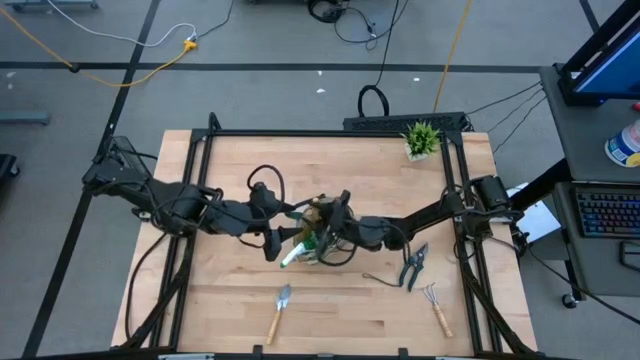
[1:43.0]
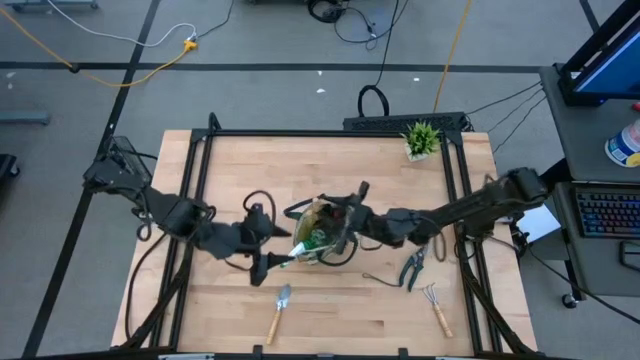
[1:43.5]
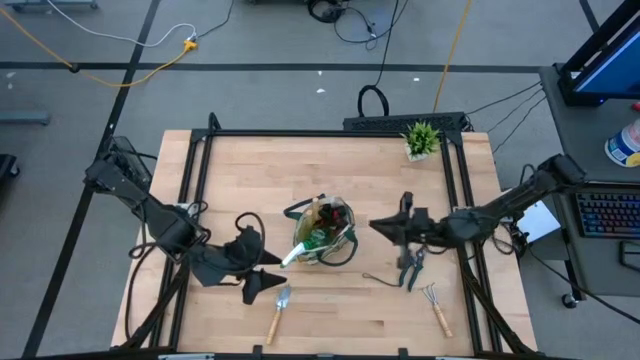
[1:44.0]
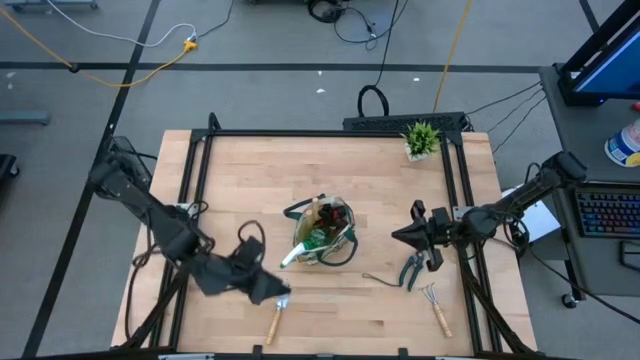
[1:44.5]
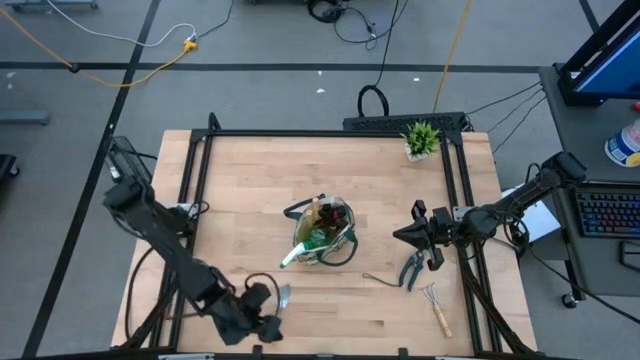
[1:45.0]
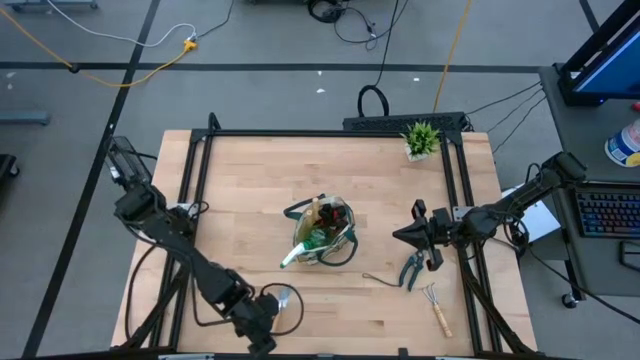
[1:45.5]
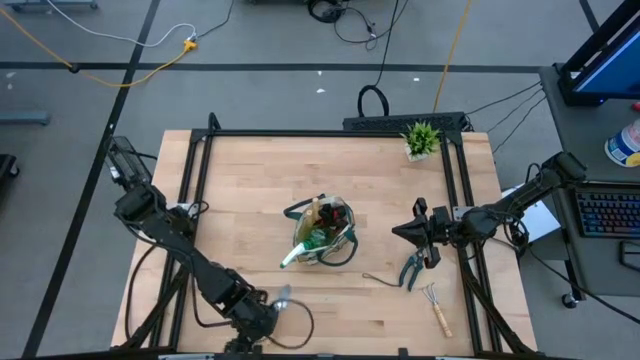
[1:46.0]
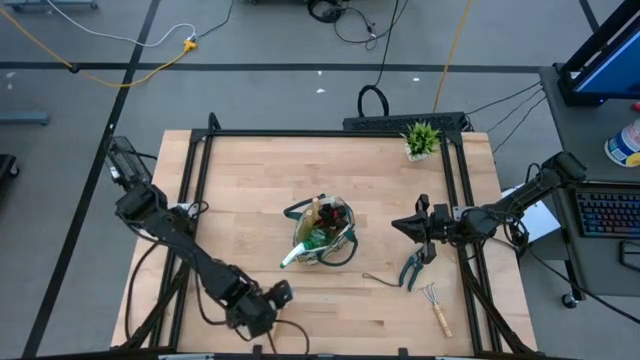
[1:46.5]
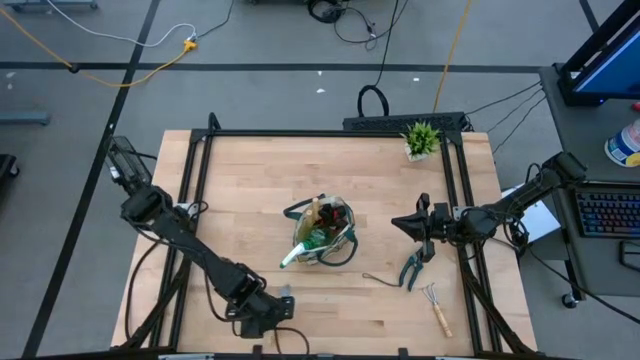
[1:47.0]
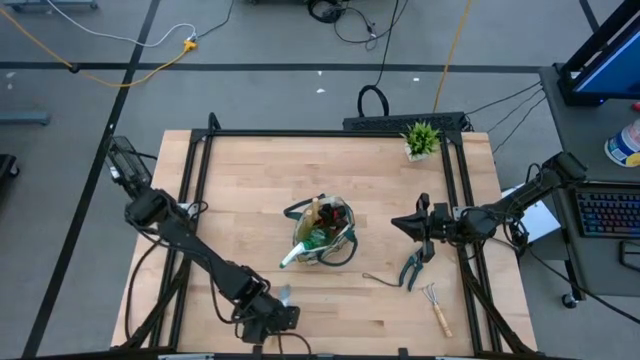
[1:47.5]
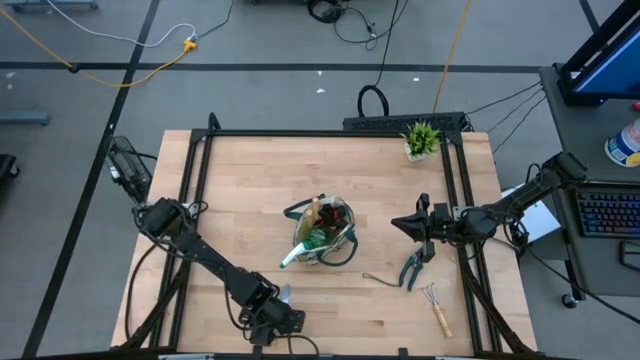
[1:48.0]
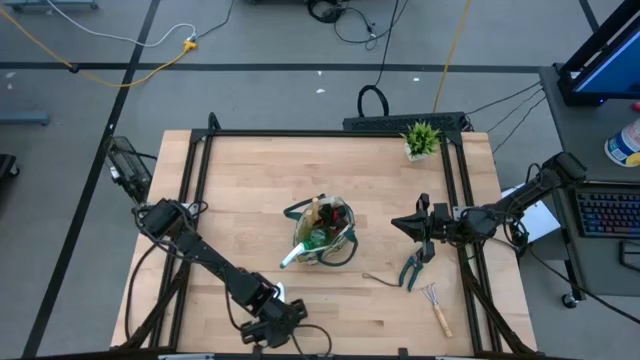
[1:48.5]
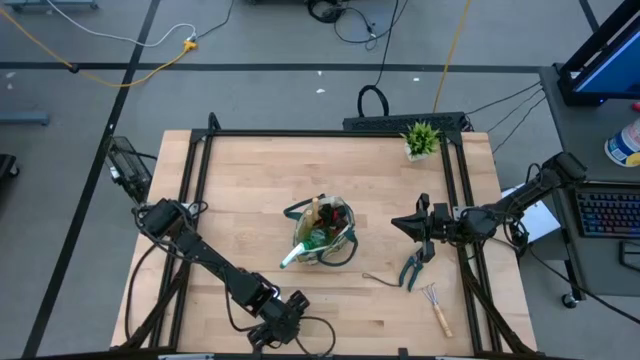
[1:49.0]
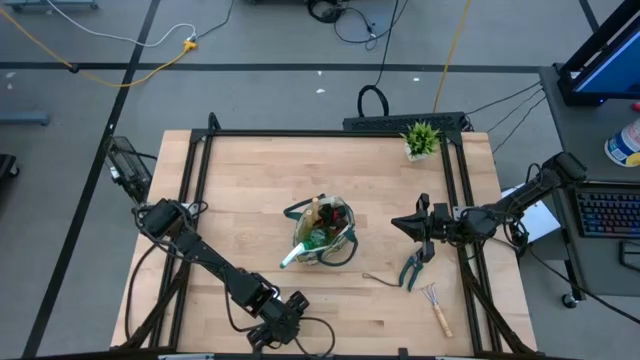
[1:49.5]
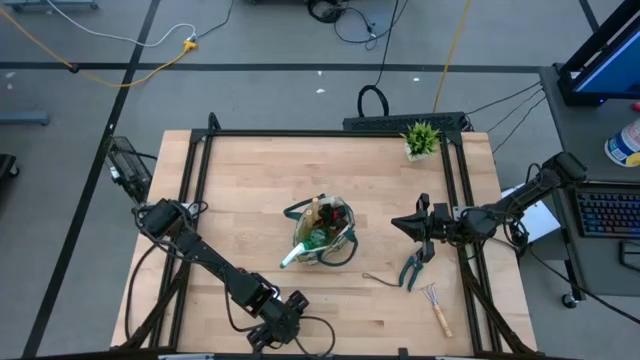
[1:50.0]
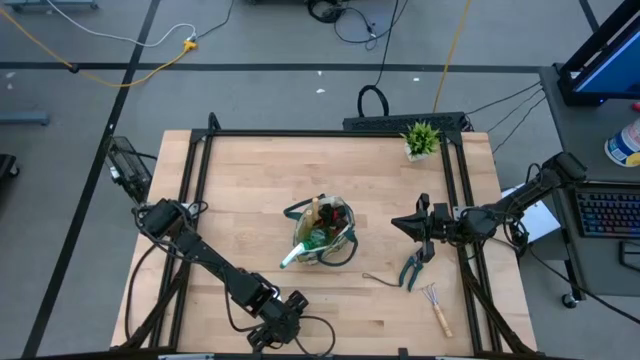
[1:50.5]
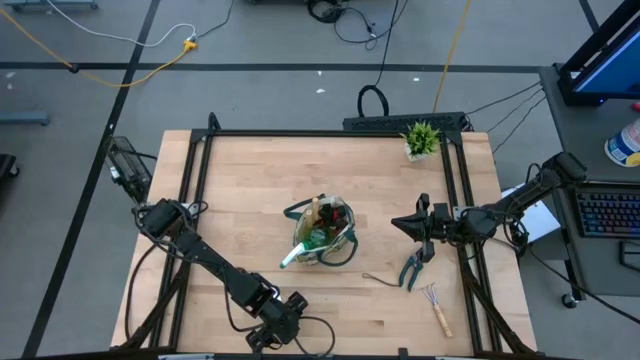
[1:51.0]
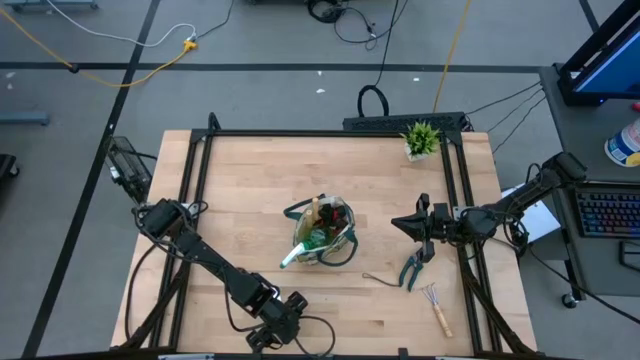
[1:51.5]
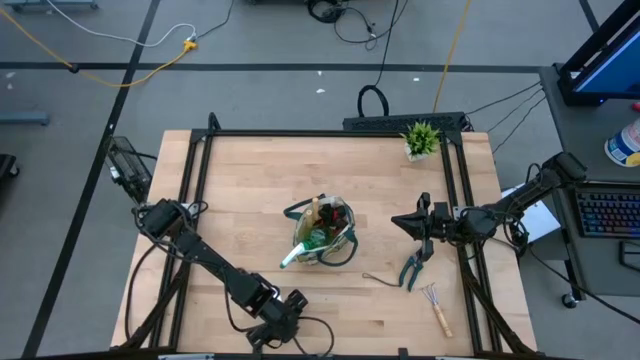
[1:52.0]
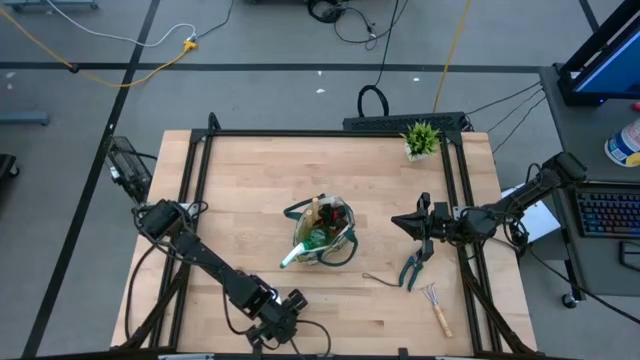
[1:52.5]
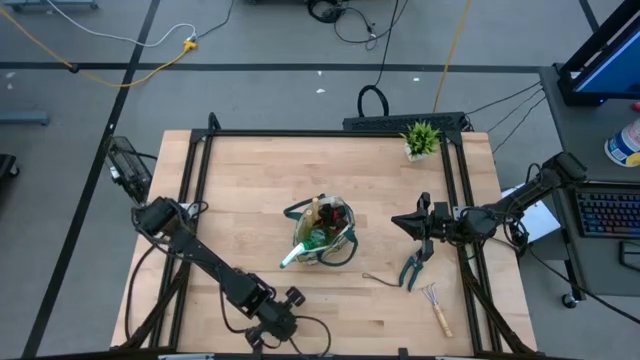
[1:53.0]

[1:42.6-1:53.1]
Task: Pick & Place Garden tools in Gardening bag
Put the trowel into the gardening bag

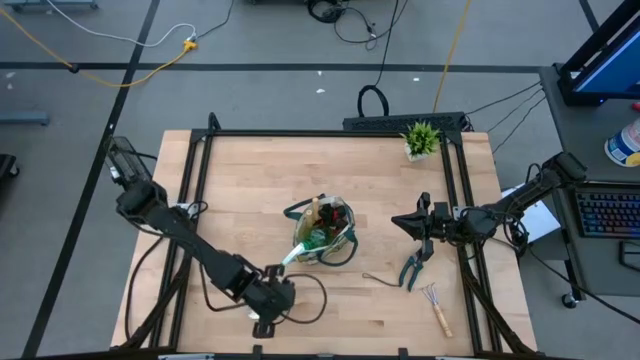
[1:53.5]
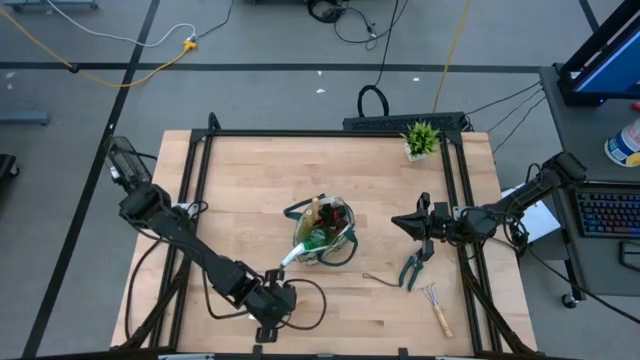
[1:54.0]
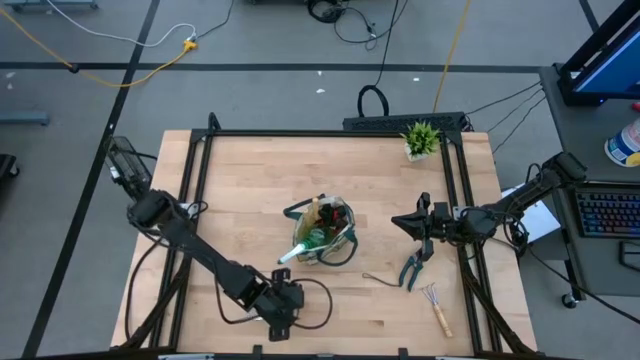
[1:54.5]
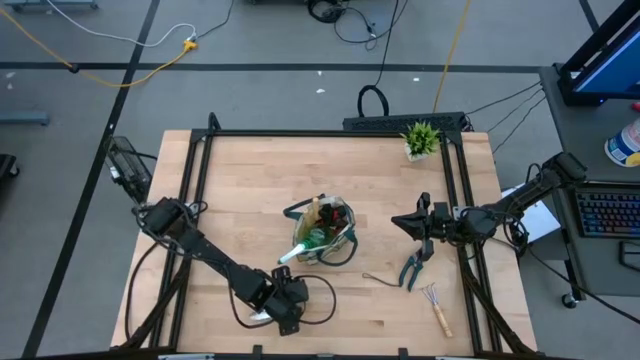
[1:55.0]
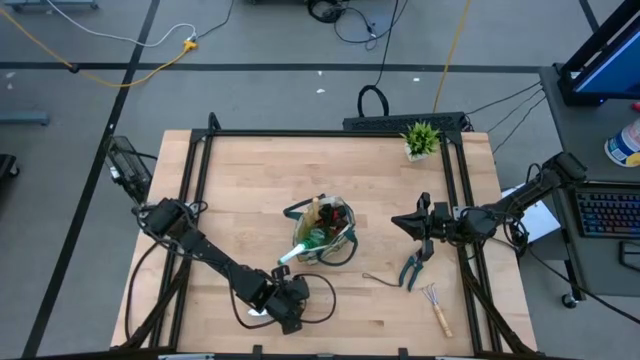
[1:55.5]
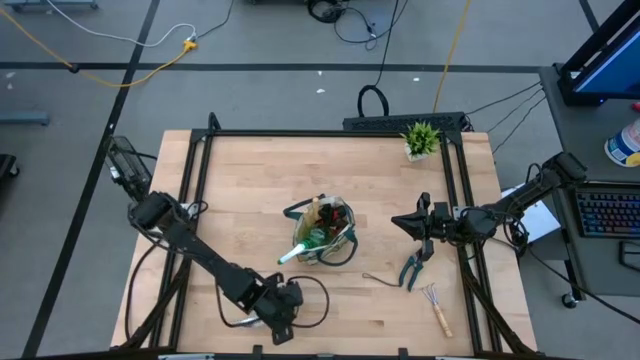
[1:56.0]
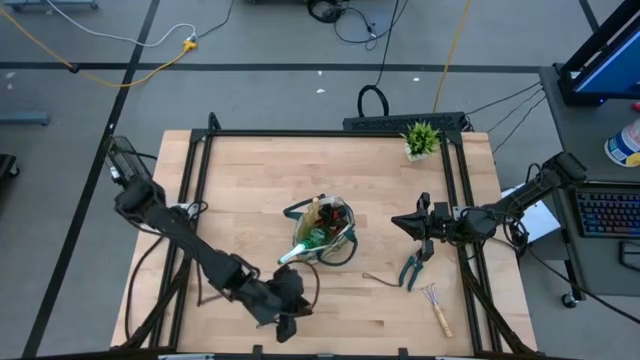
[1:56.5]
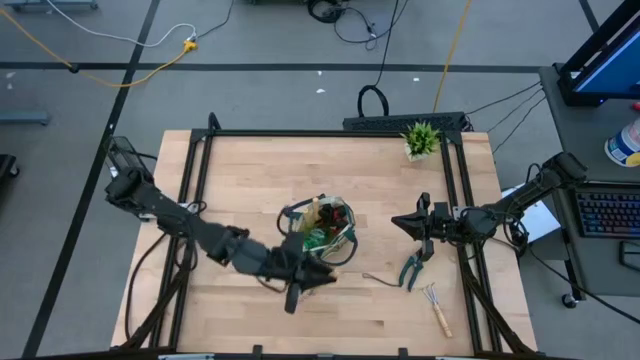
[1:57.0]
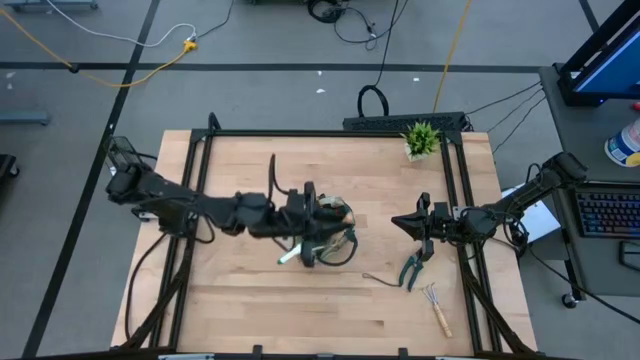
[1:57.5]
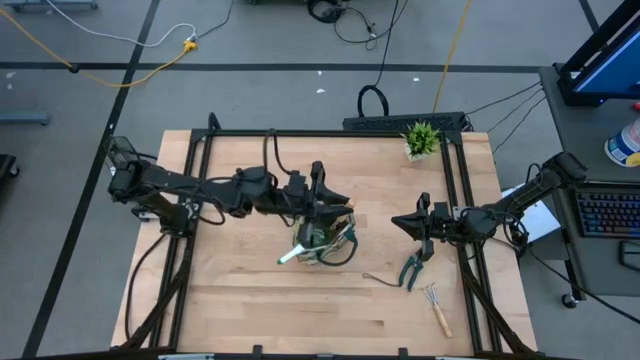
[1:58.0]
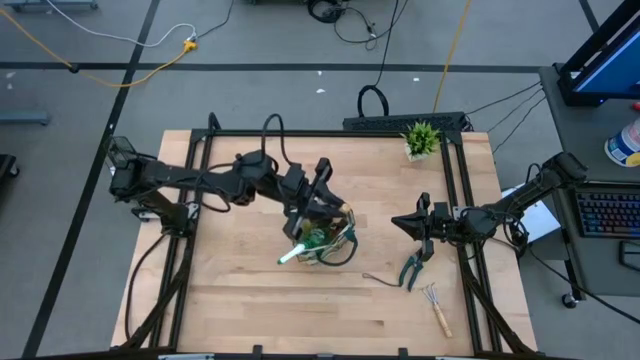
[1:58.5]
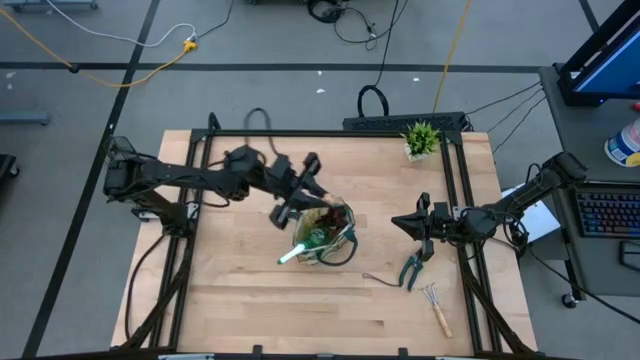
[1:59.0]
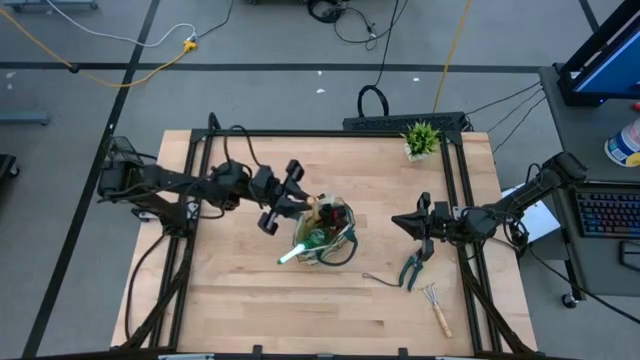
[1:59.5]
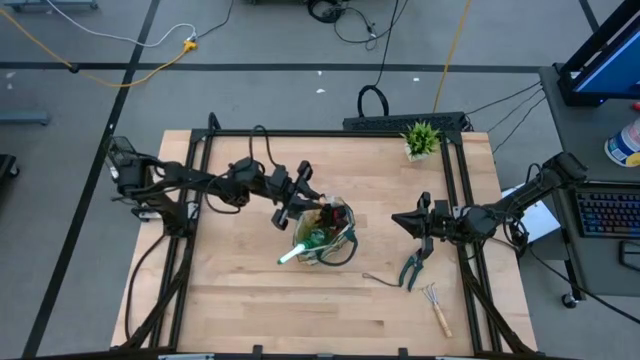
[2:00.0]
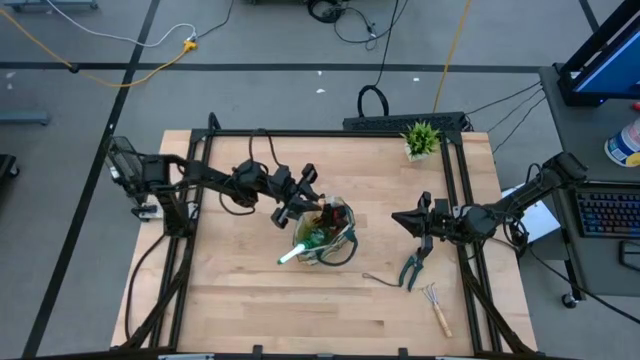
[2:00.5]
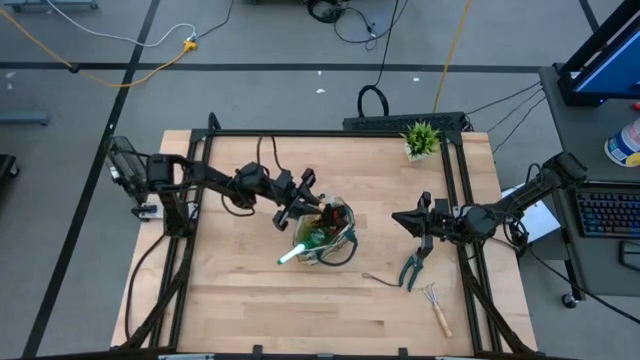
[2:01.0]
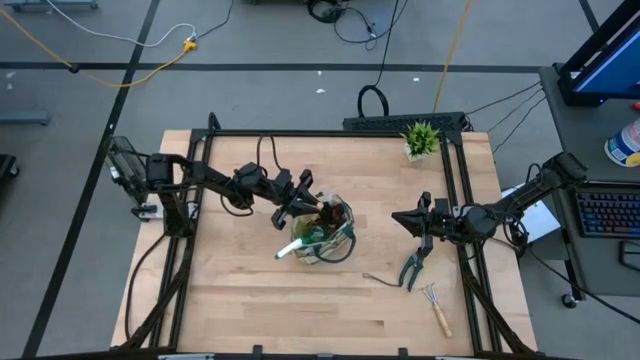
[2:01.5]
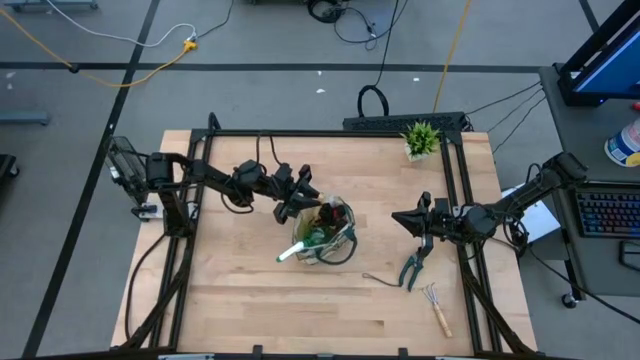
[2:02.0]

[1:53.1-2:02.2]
Put the trowel into the gardening bag
